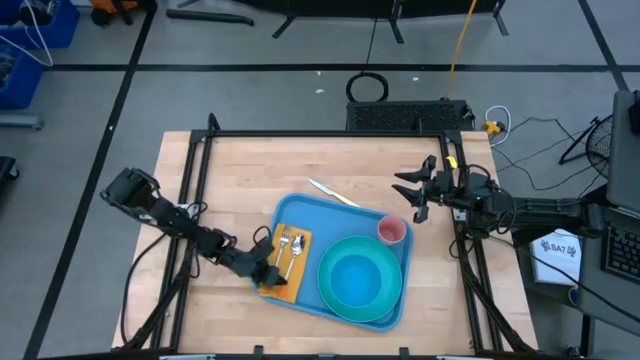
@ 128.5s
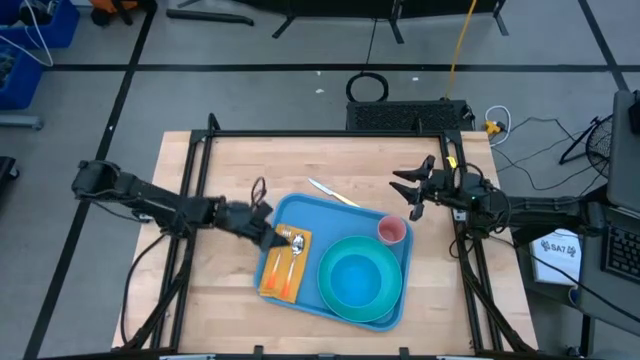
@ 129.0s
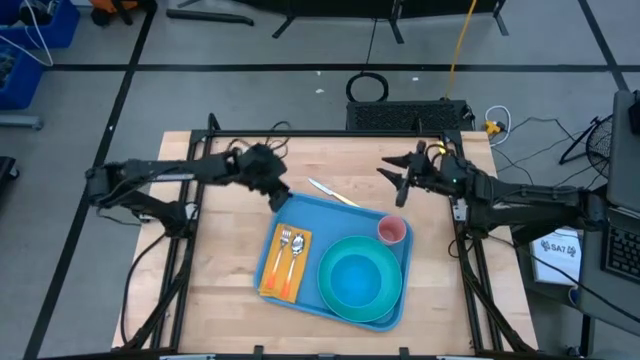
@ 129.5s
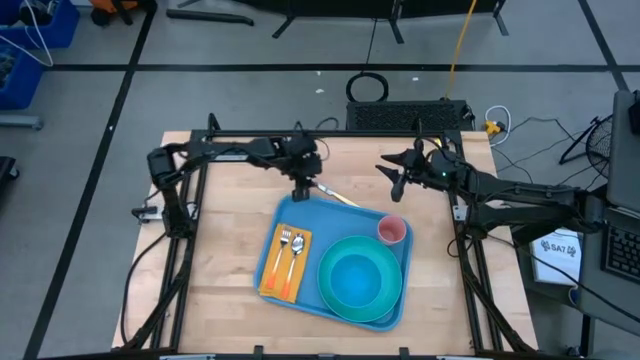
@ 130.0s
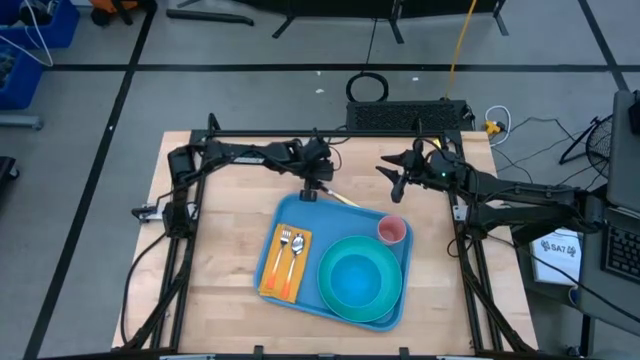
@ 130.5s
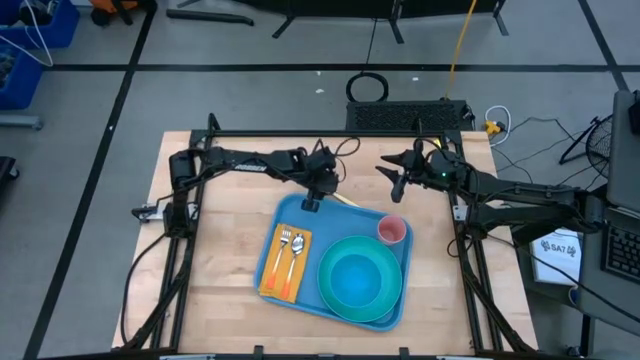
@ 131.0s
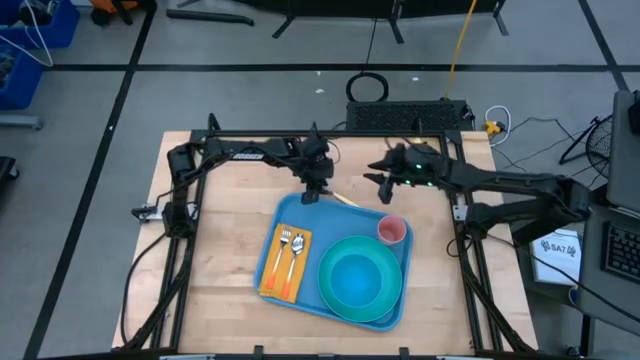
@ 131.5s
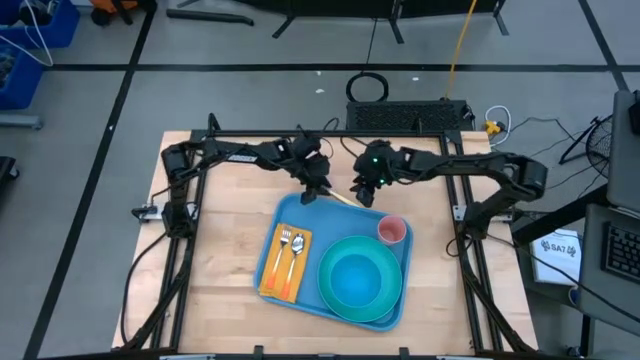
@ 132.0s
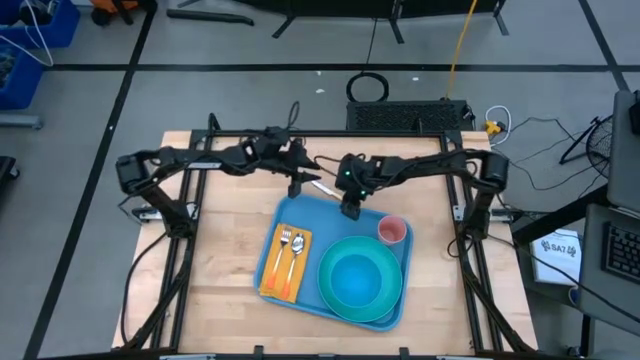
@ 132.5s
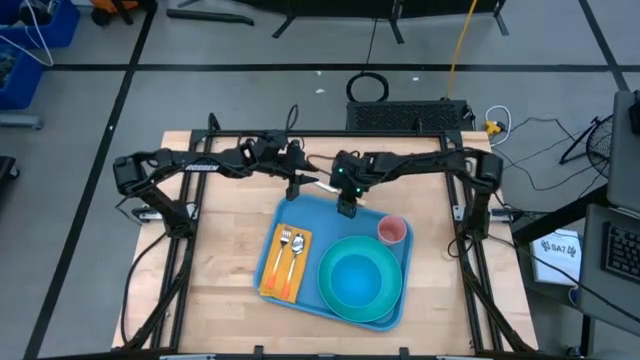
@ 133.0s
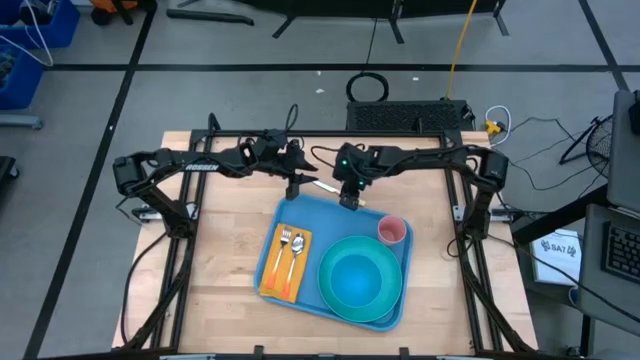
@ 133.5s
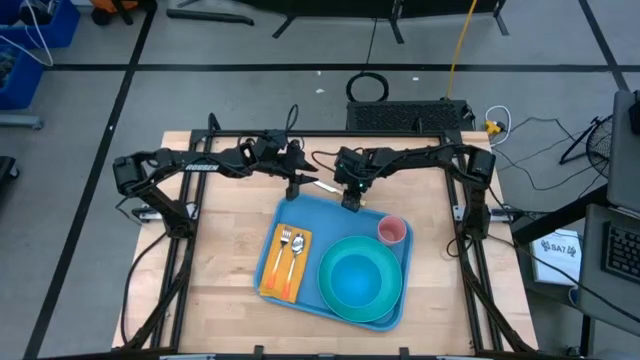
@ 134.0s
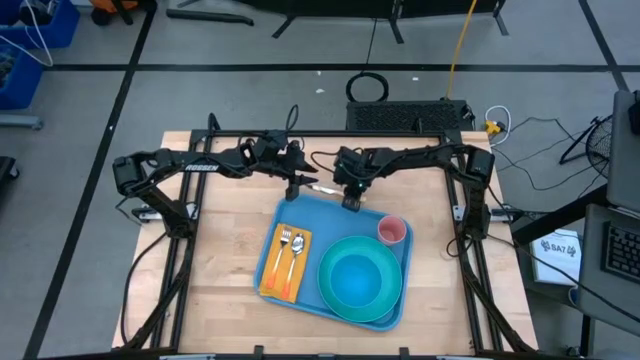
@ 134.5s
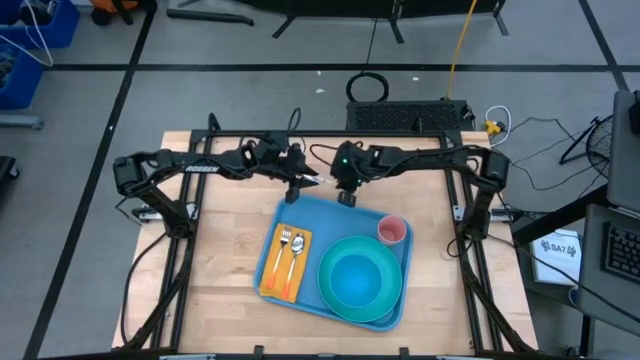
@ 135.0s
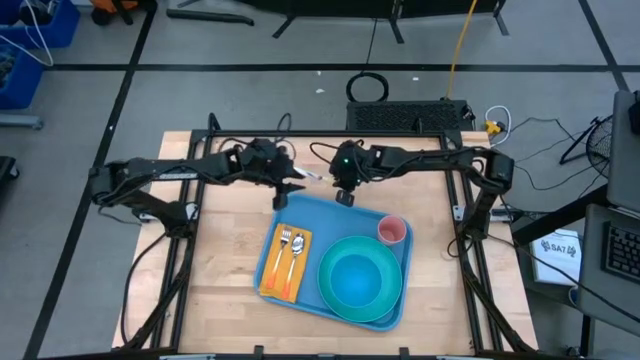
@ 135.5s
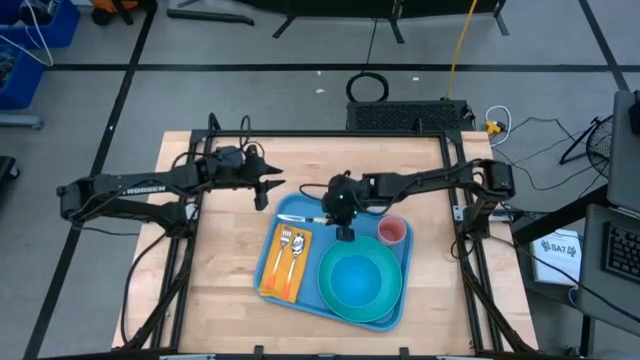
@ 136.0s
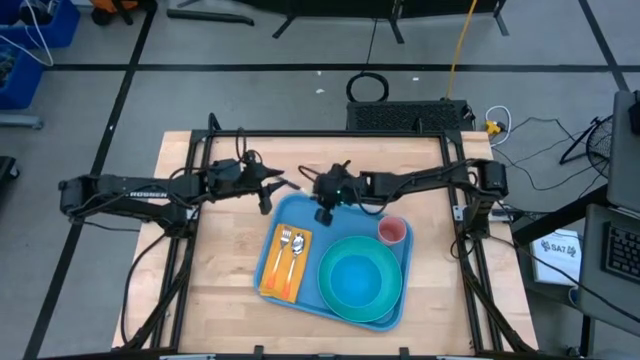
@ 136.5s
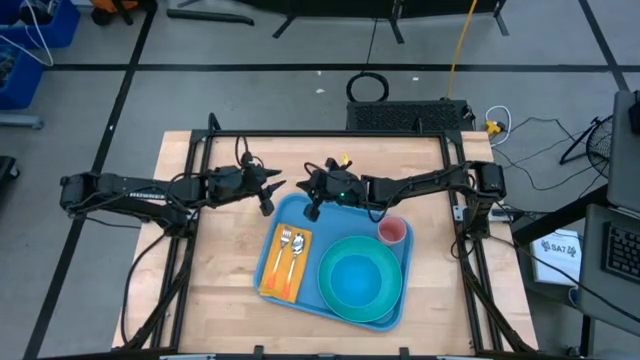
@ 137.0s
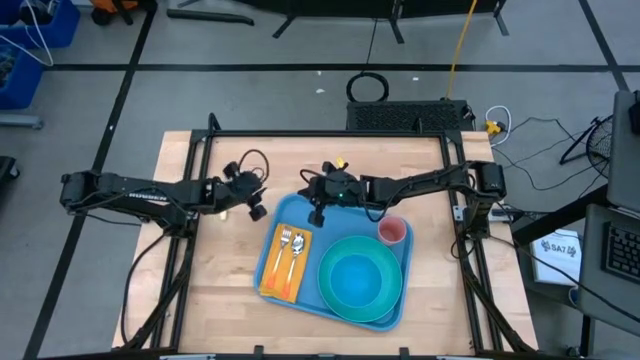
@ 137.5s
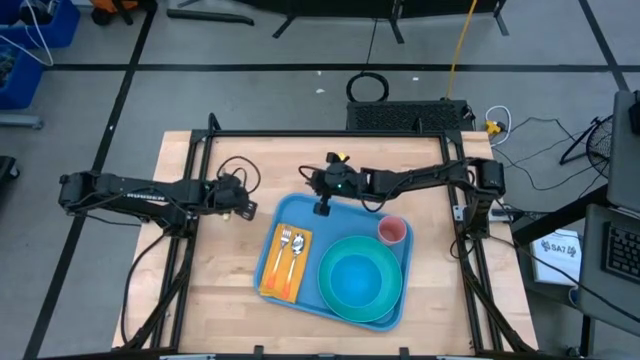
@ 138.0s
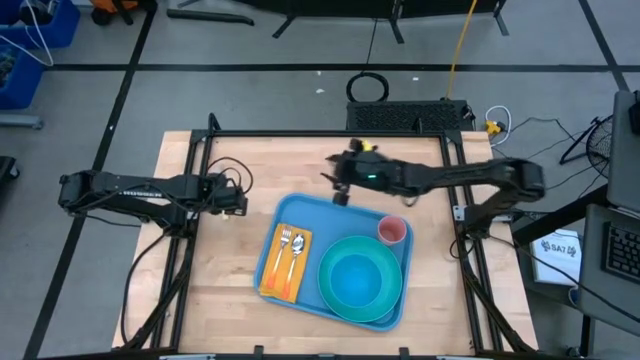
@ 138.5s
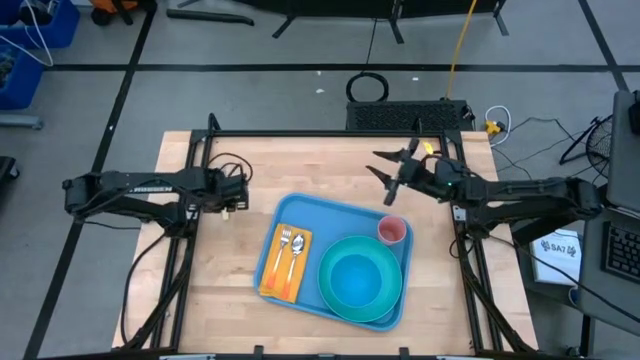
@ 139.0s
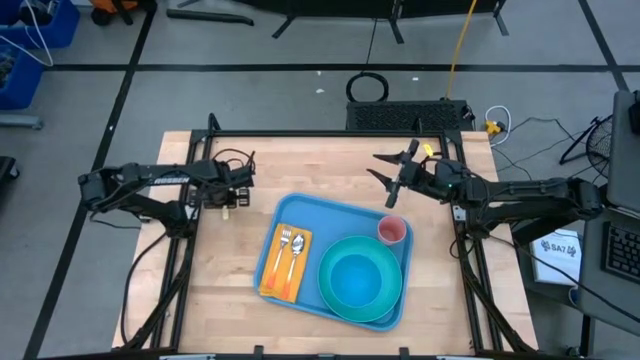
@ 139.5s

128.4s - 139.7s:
Task: Set up tray
Put the yellow knife on top of the yellow table napkin

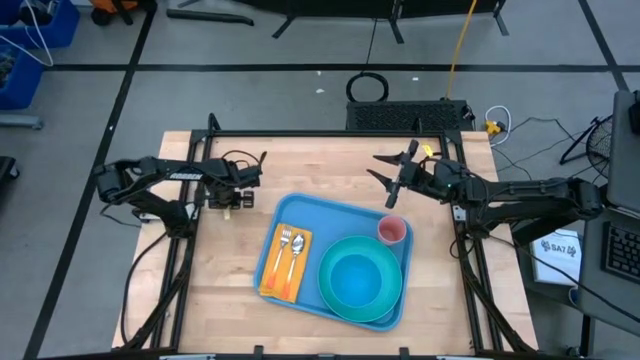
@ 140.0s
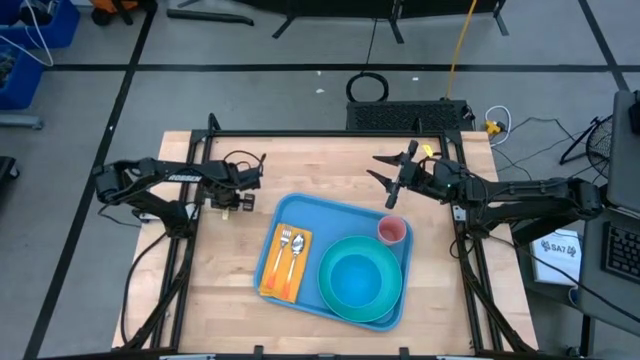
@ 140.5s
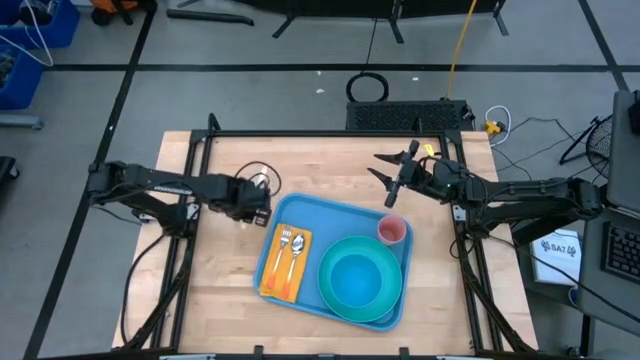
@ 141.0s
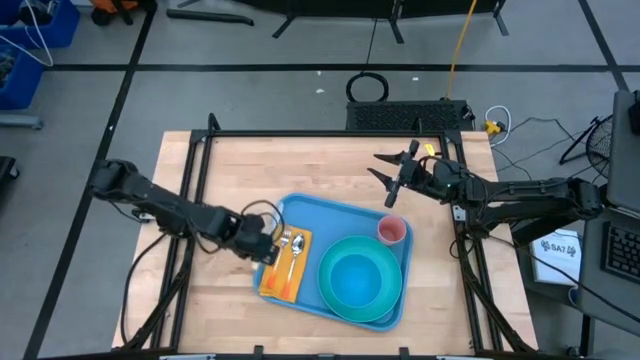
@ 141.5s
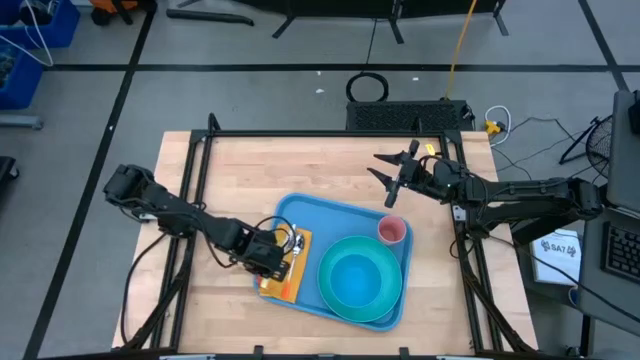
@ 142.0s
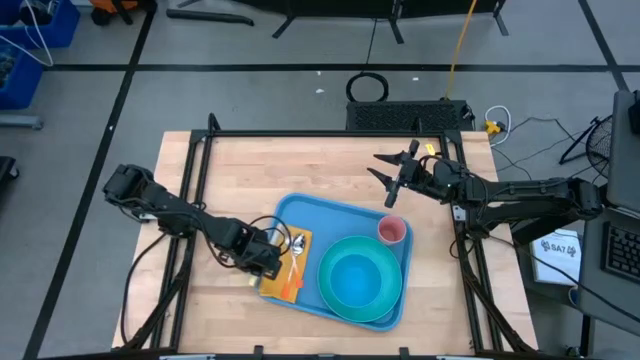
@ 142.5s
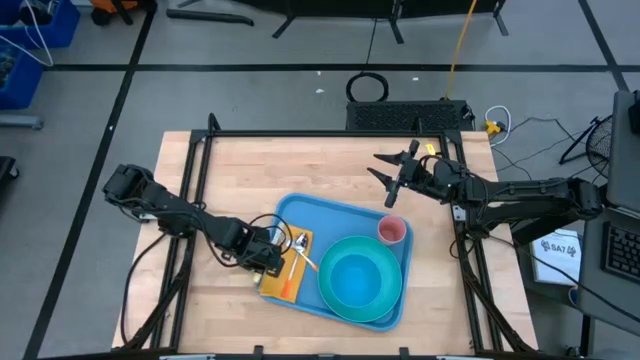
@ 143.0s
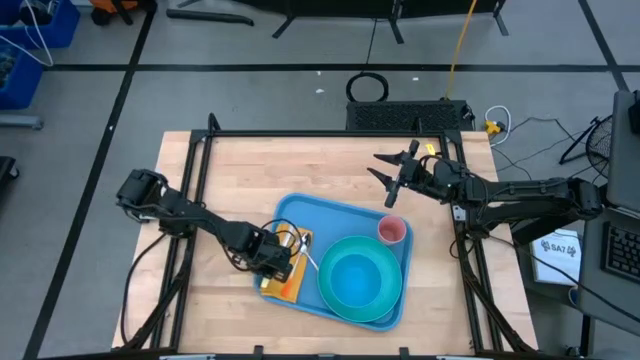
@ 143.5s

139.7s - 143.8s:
Put the yellow knife on top of the yellow table napkin

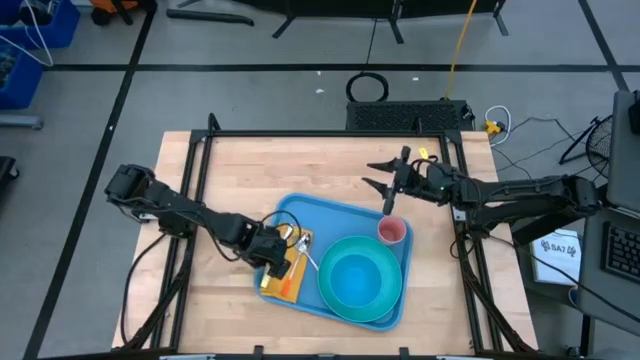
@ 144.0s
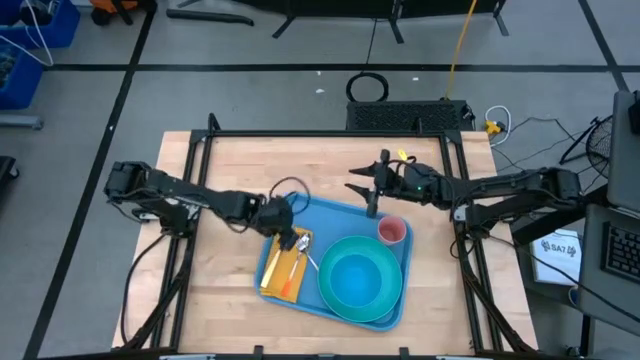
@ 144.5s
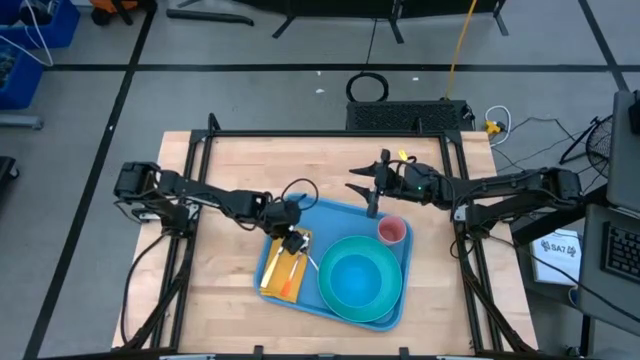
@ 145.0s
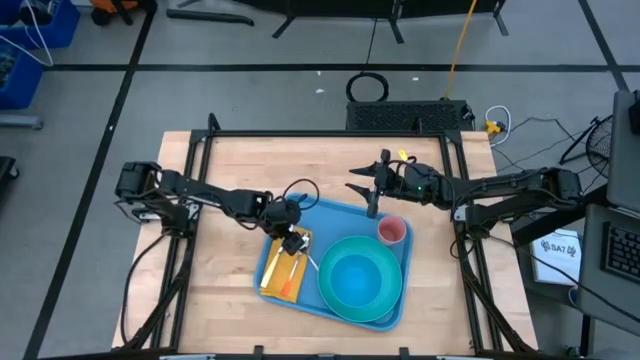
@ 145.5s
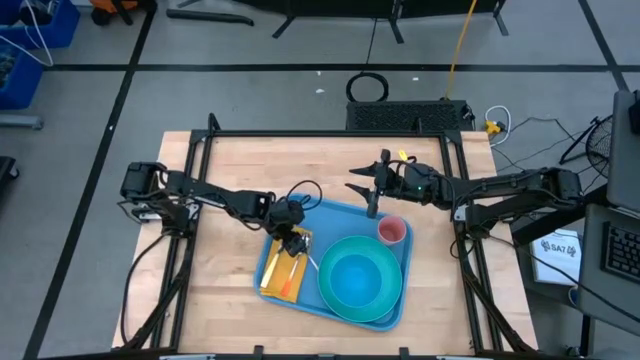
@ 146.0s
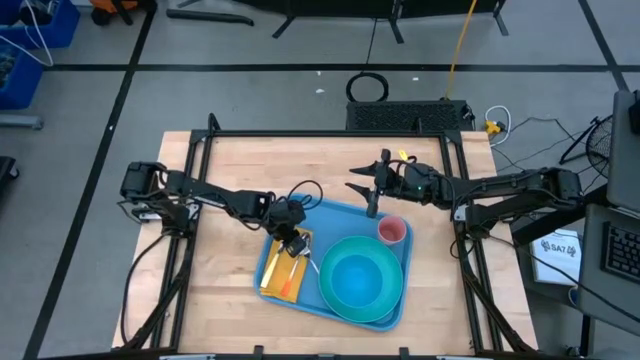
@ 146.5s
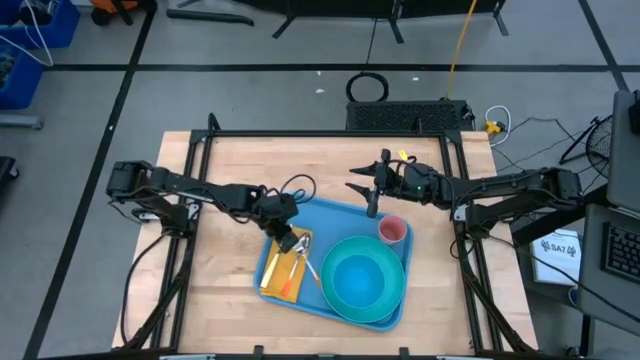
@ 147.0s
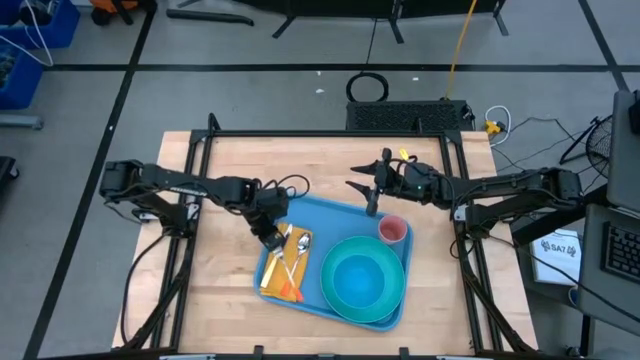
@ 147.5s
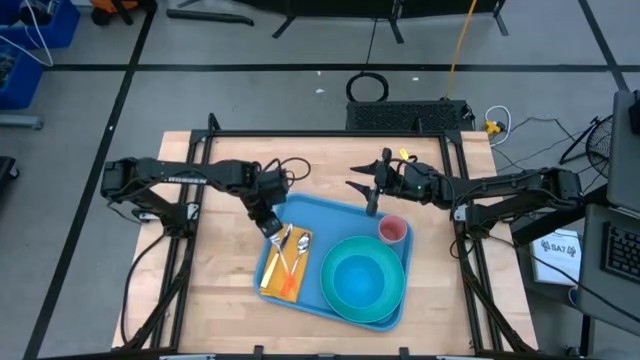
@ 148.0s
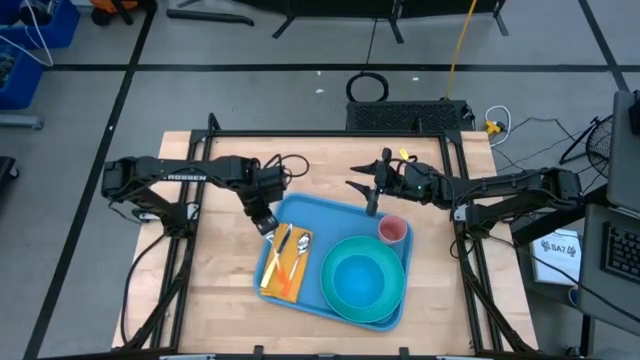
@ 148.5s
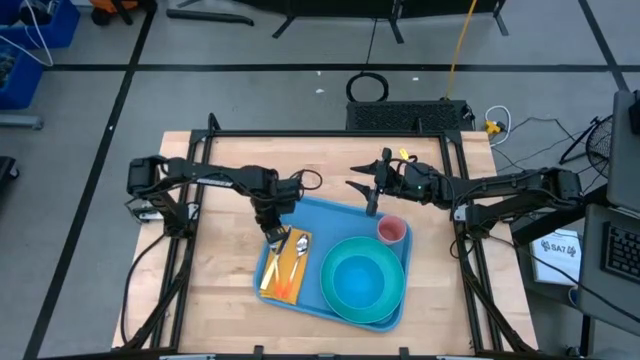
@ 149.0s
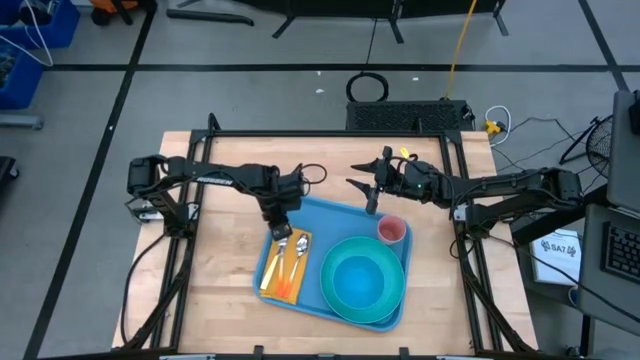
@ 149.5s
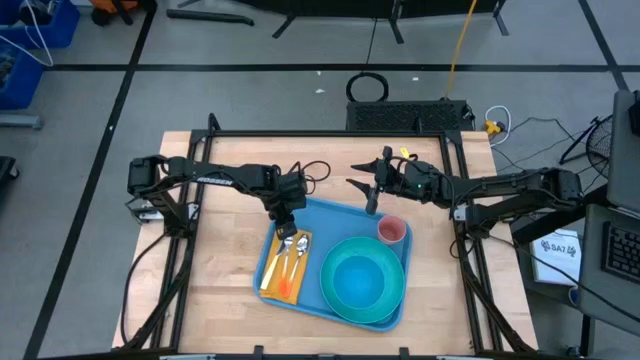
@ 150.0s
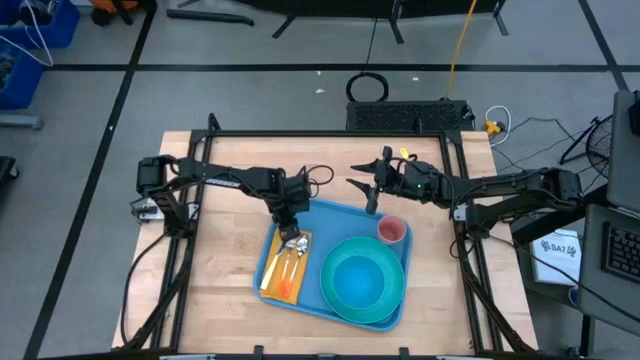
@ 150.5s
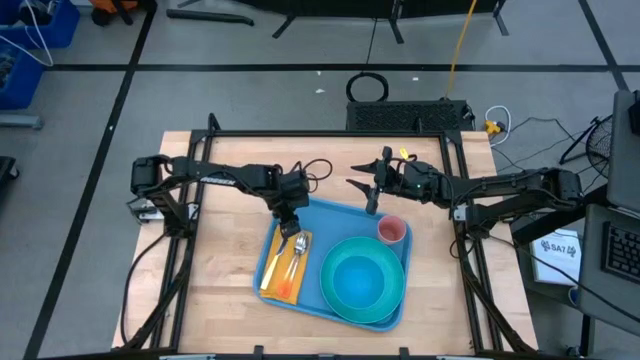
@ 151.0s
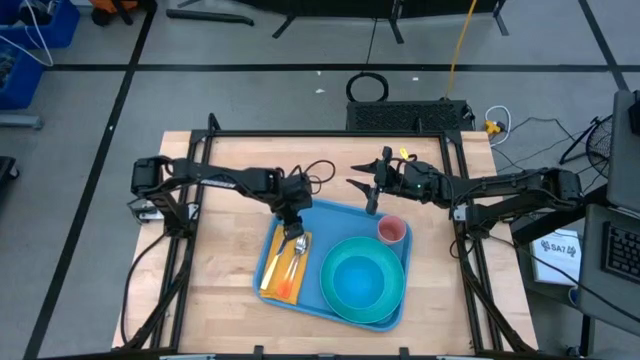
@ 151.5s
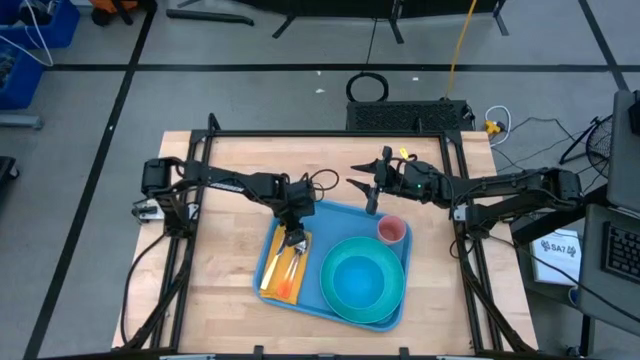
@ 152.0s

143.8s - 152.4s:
Put the orange fork on top of the yellow table napkin
